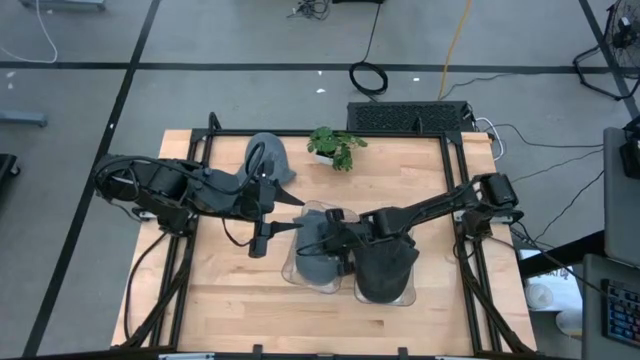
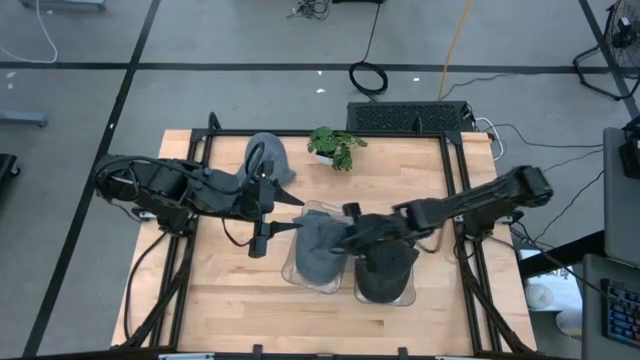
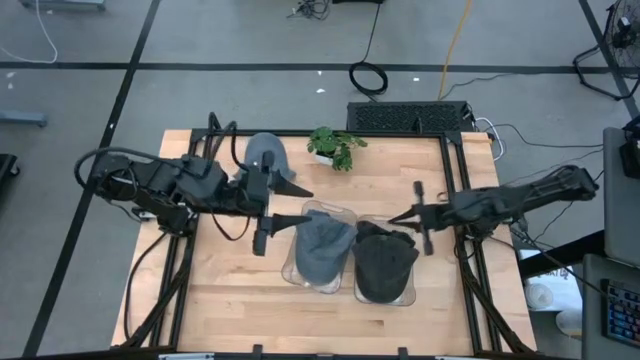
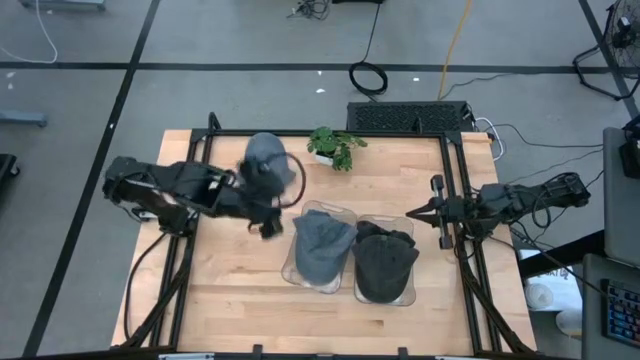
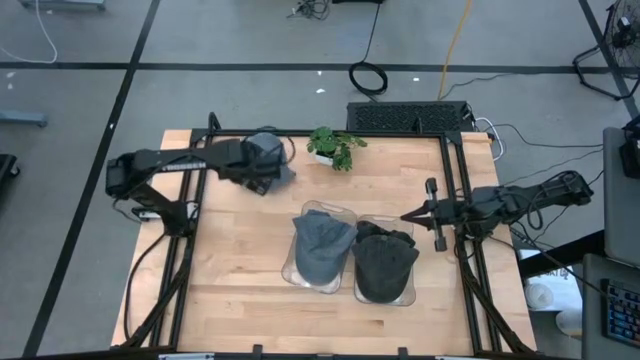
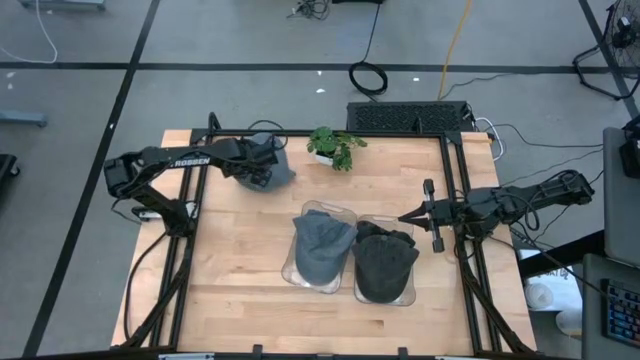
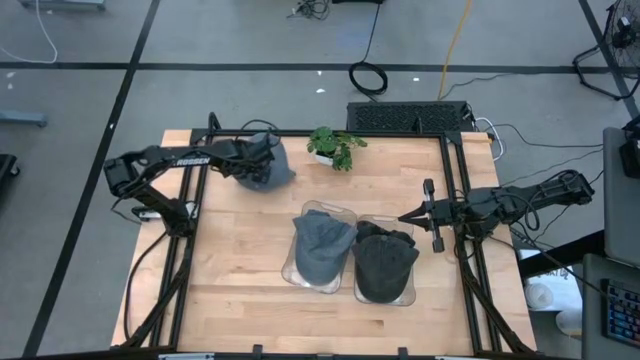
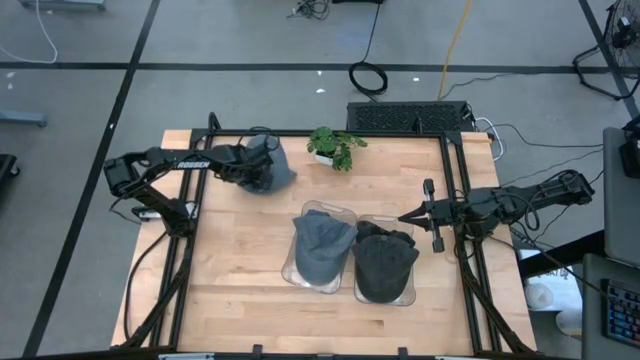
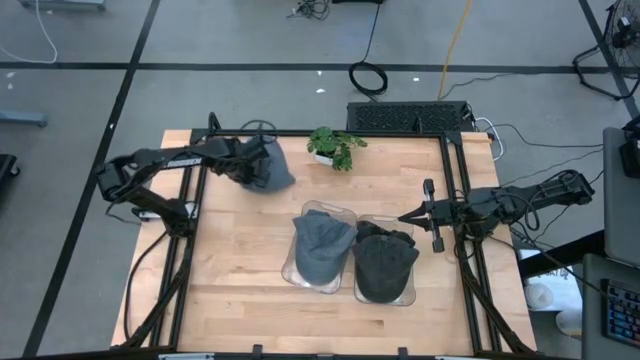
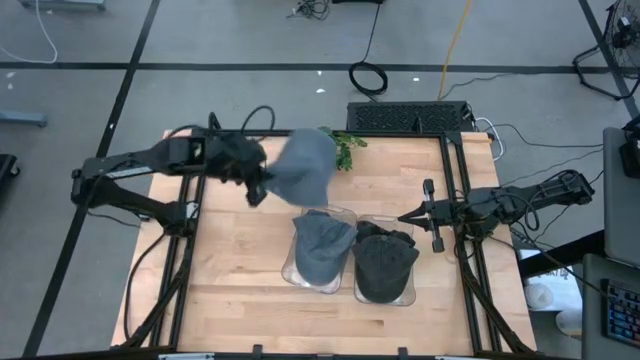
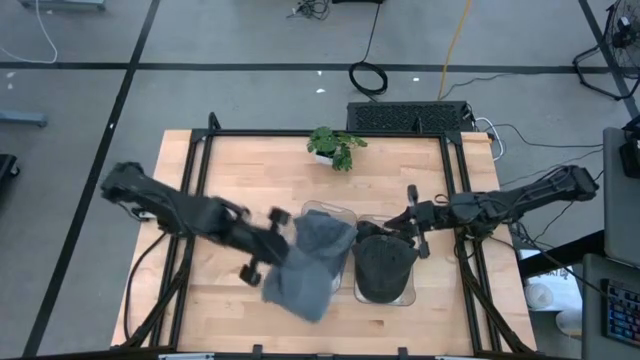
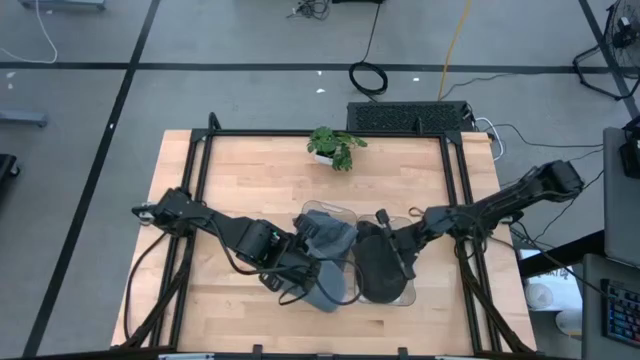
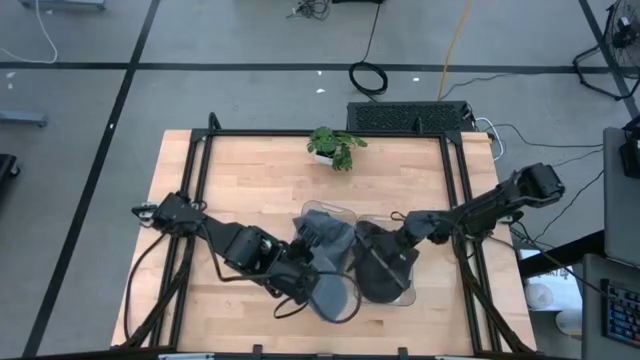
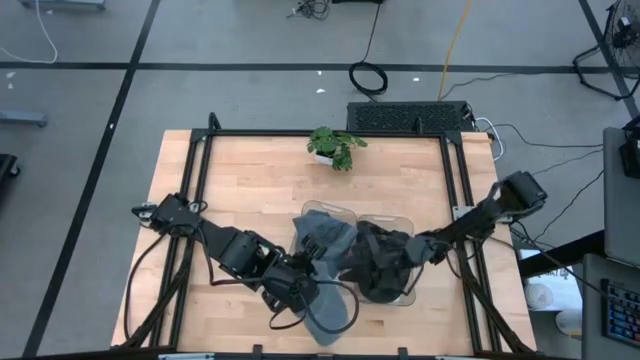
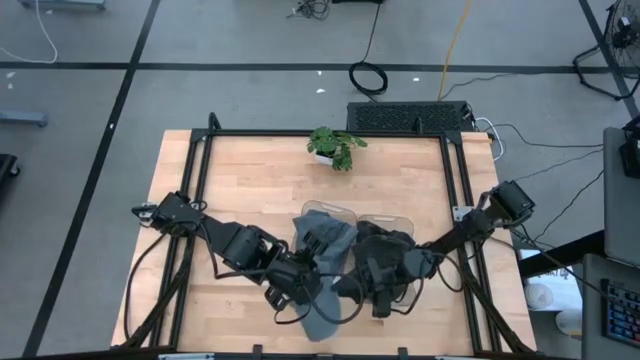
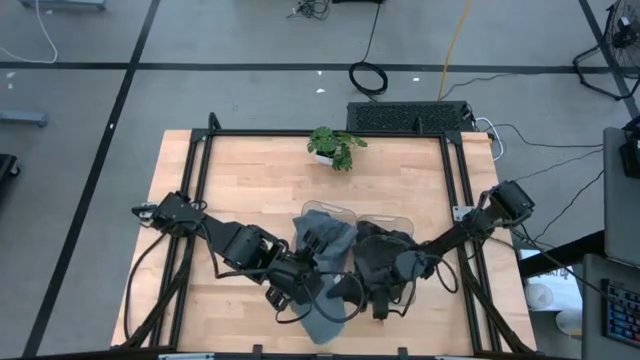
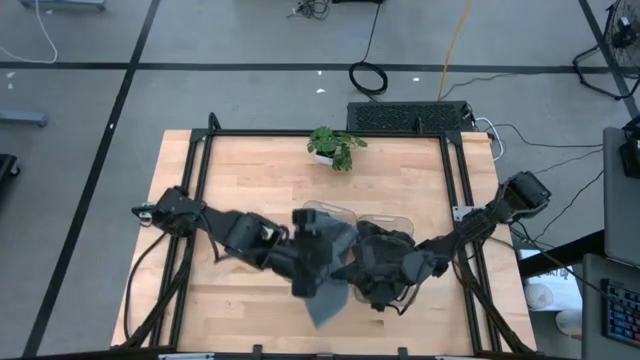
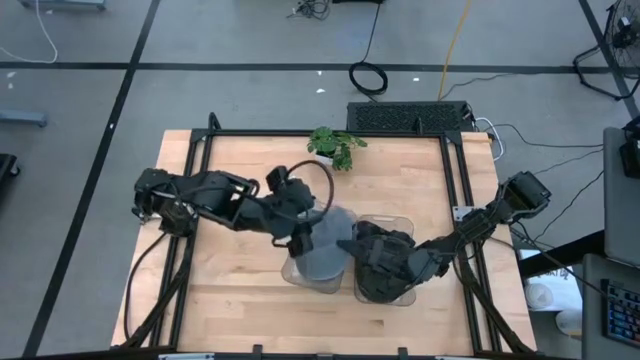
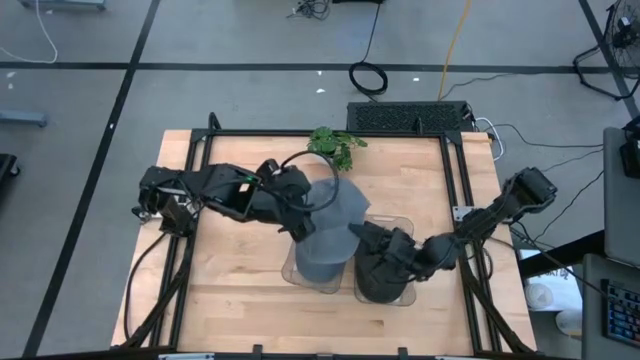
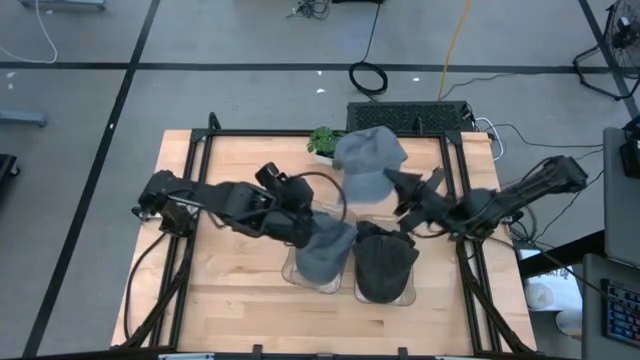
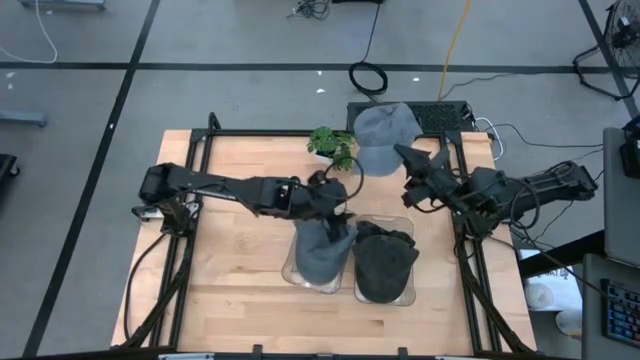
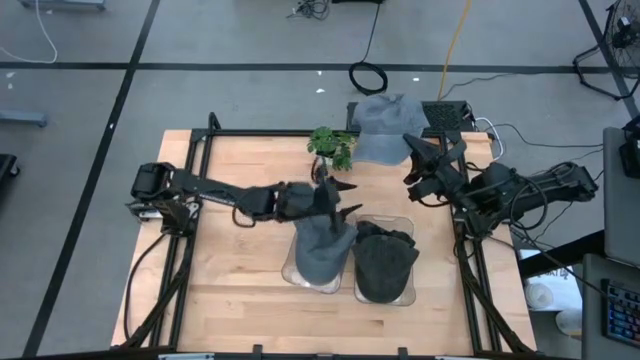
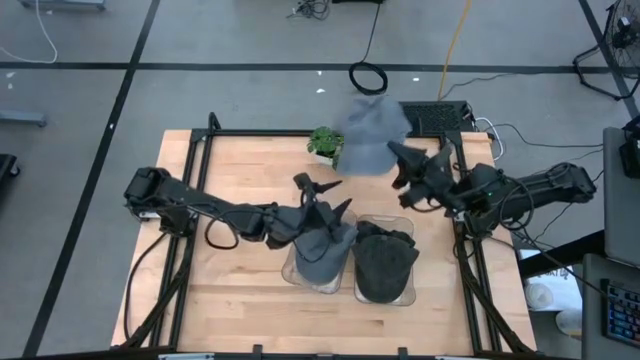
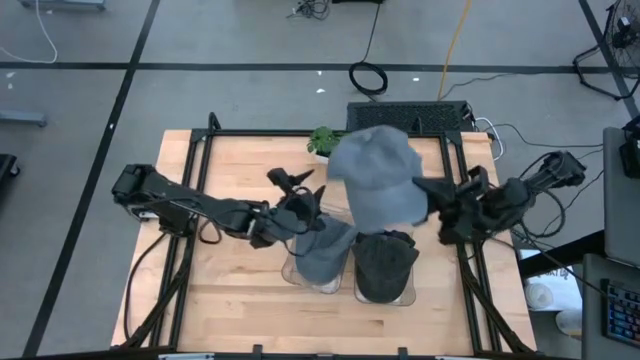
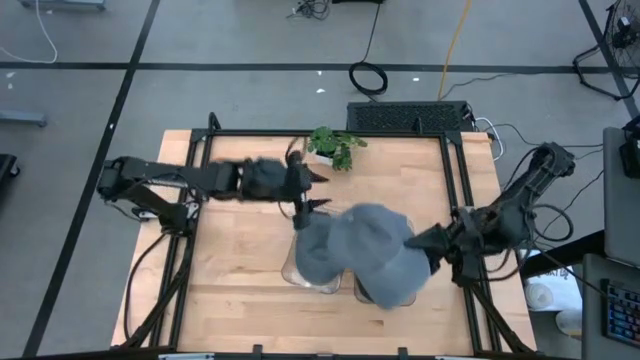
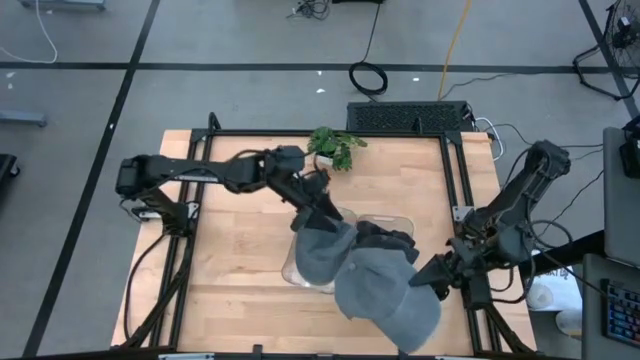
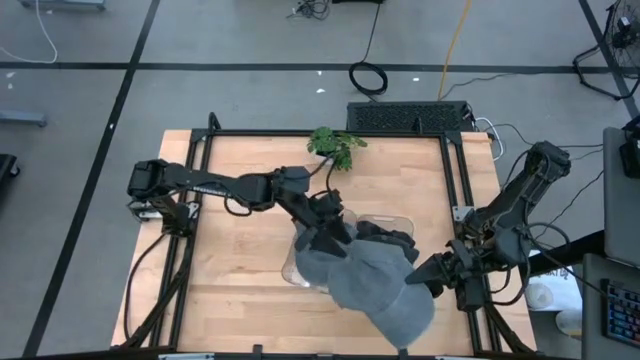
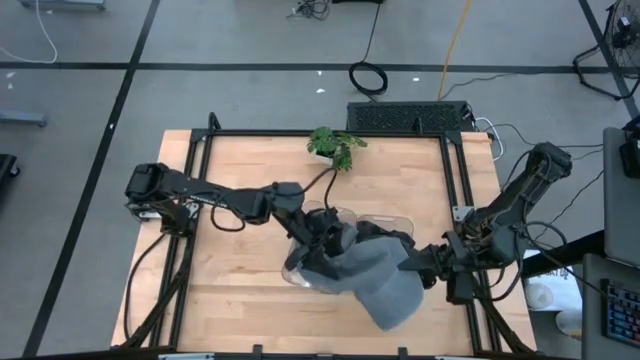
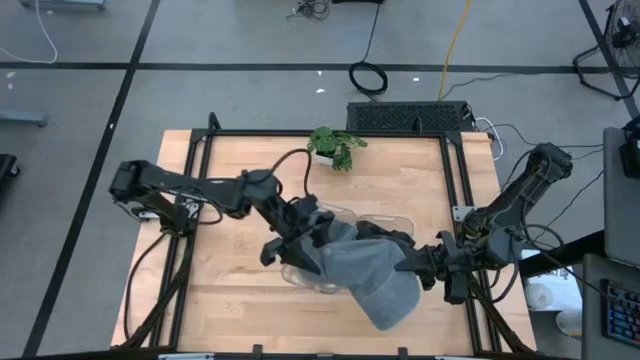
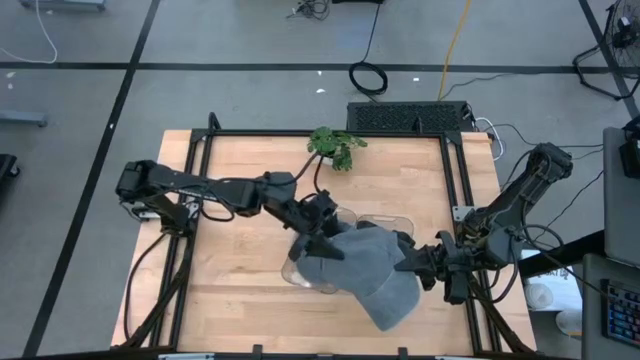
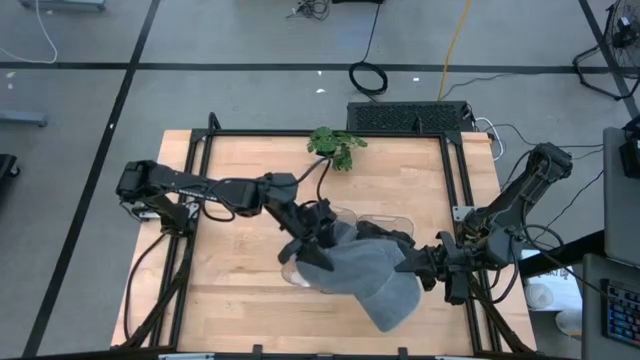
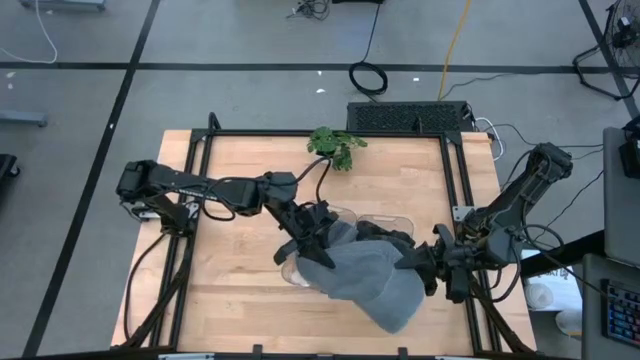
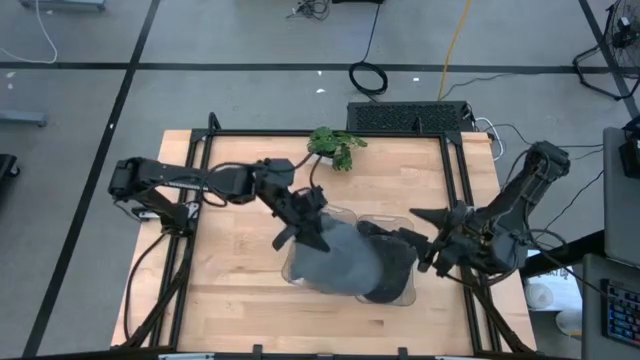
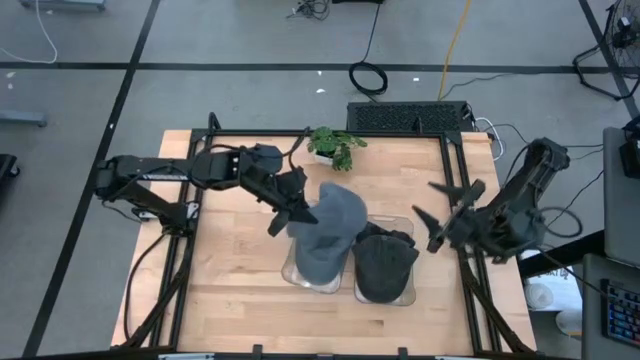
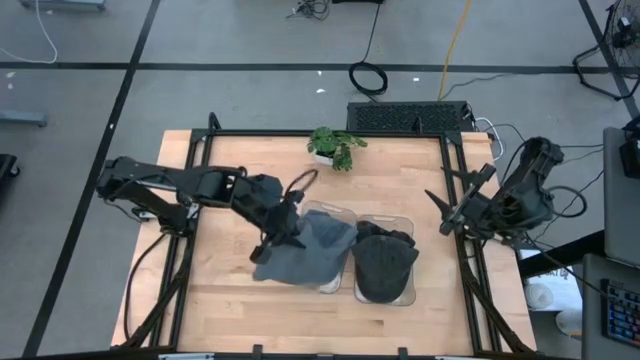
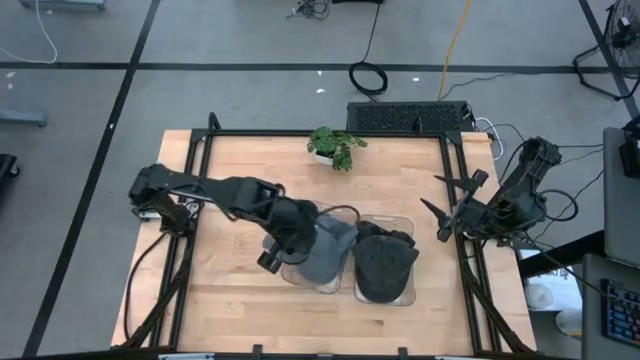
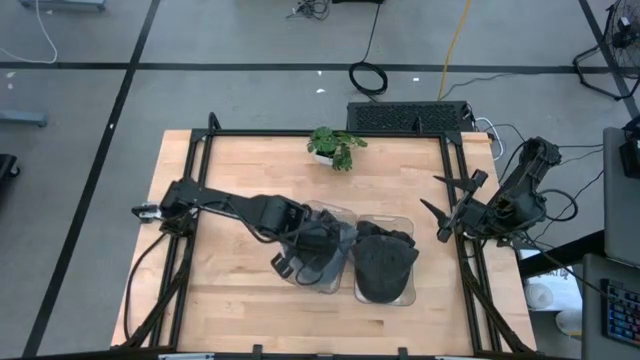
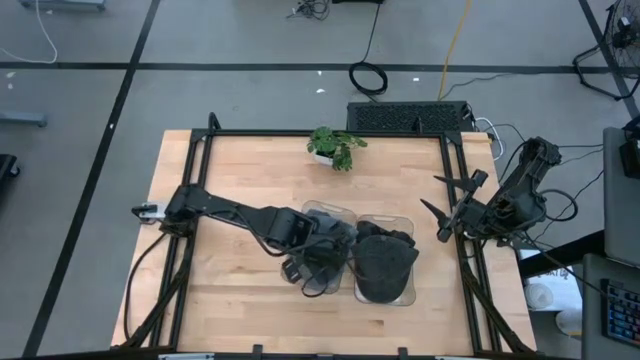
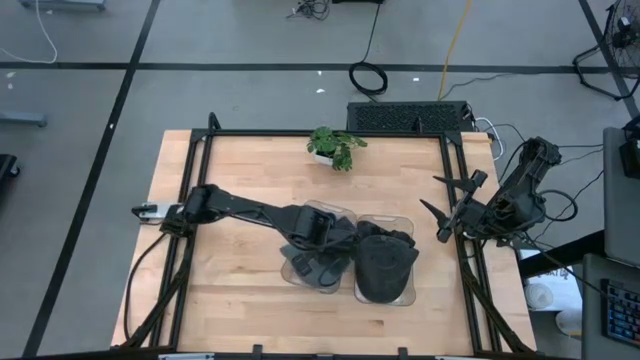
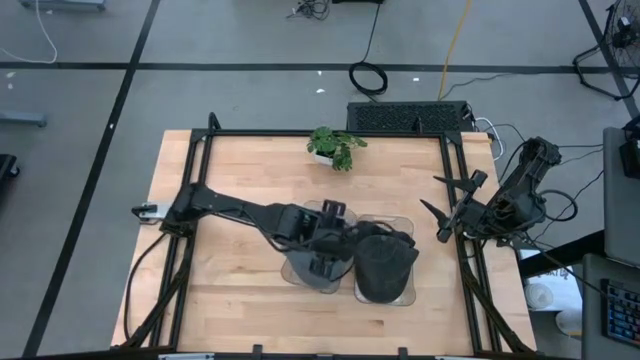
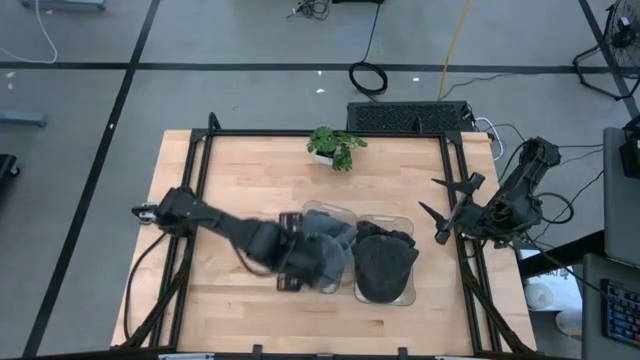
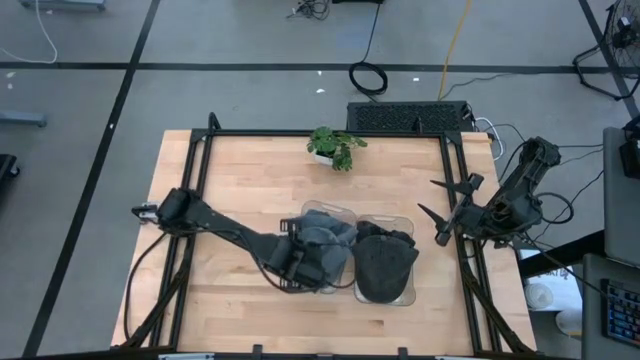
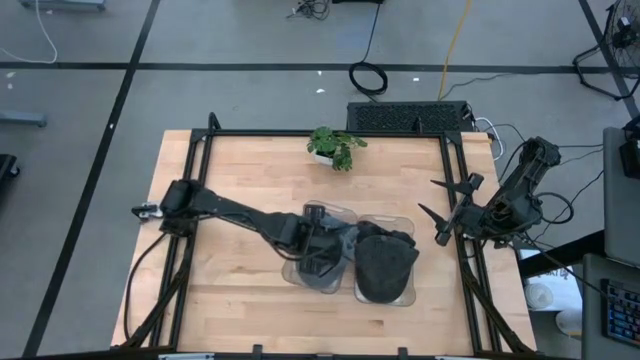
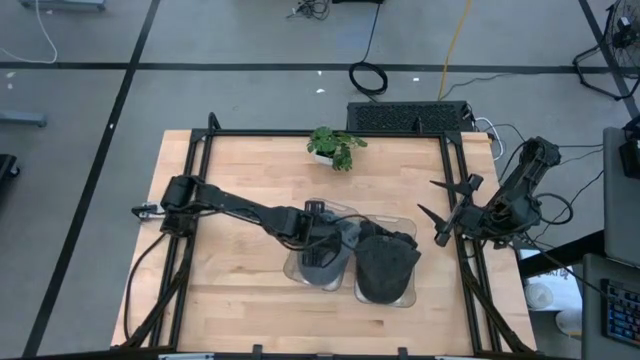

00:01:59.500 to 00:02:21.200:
Task: Pick & Place hat
Put the gray cap into the left transparent bin
